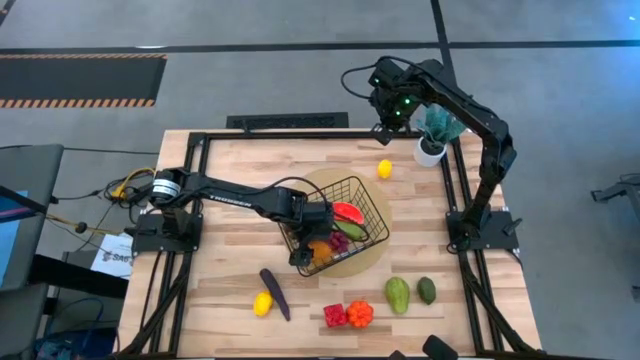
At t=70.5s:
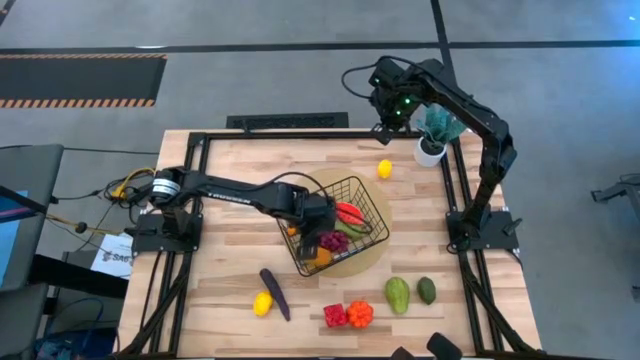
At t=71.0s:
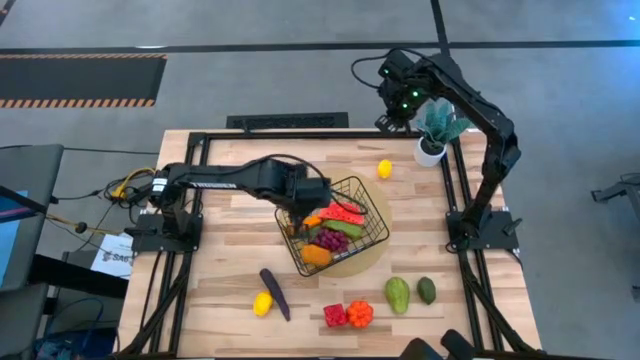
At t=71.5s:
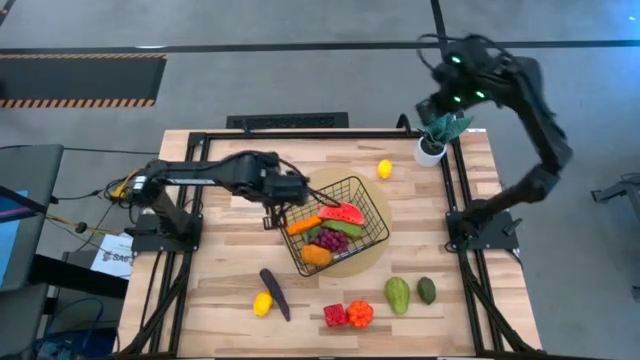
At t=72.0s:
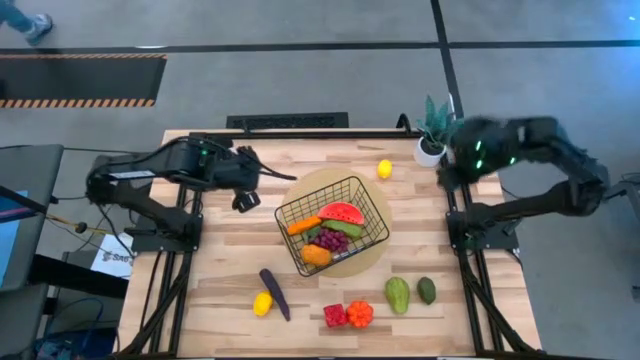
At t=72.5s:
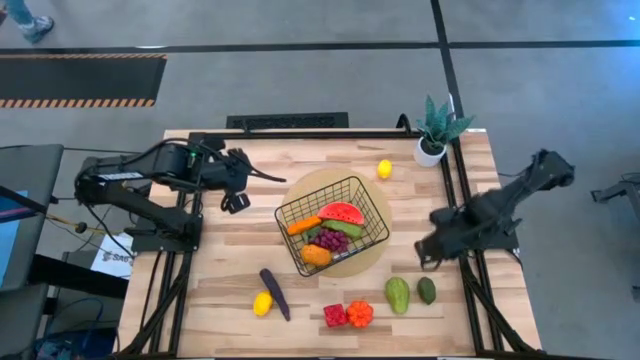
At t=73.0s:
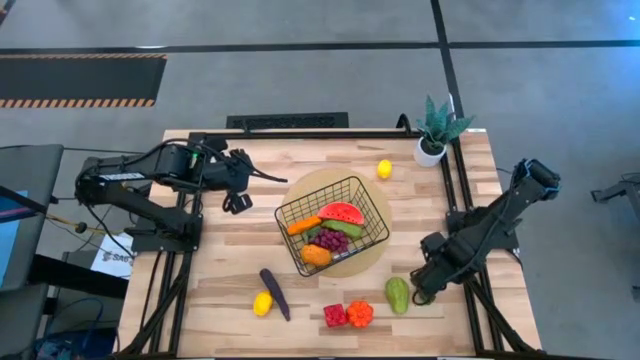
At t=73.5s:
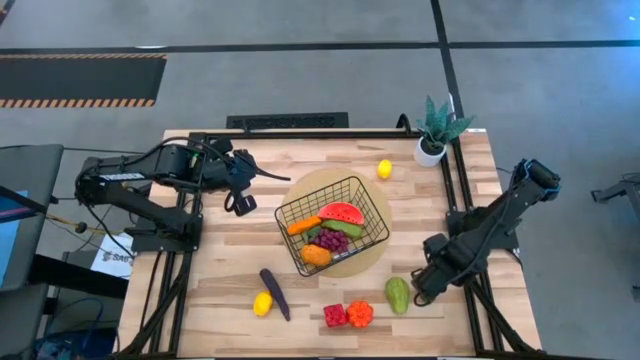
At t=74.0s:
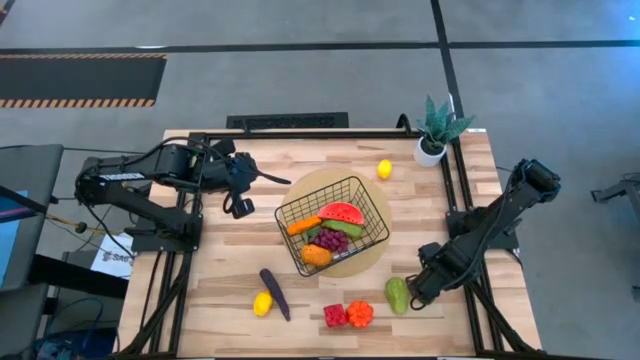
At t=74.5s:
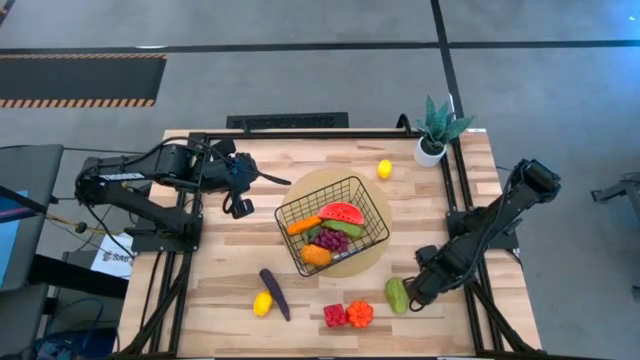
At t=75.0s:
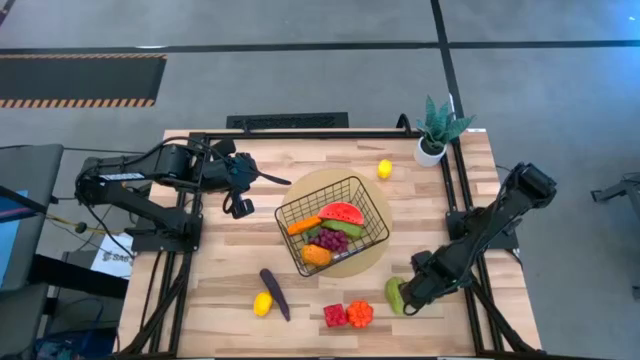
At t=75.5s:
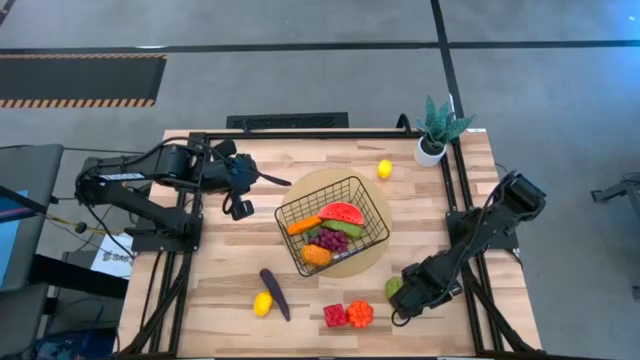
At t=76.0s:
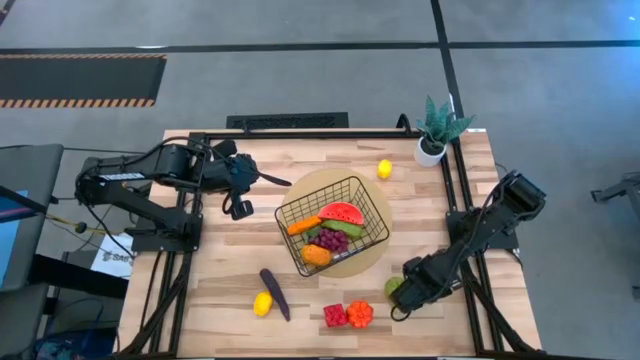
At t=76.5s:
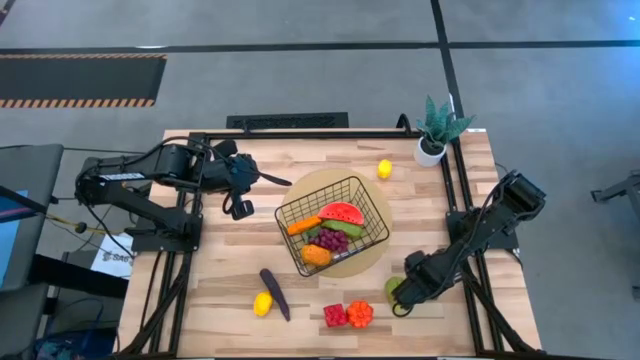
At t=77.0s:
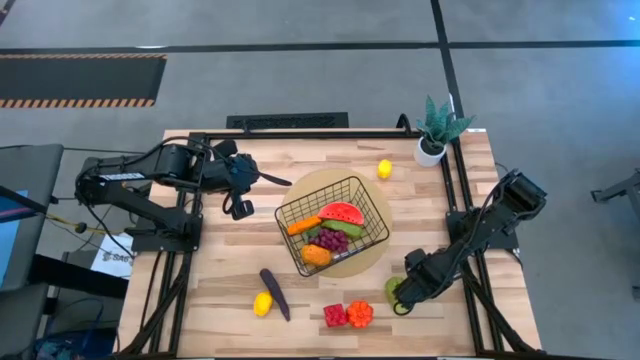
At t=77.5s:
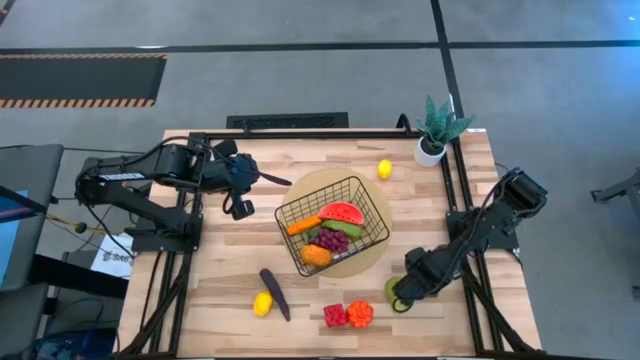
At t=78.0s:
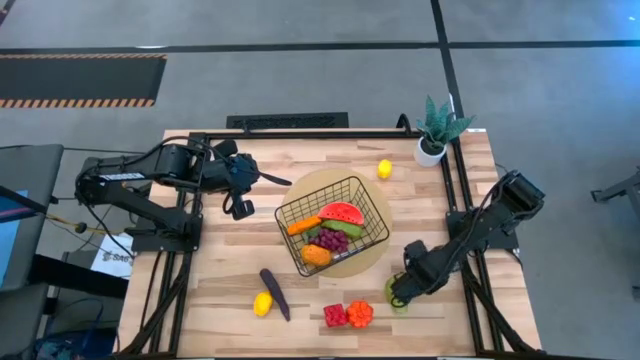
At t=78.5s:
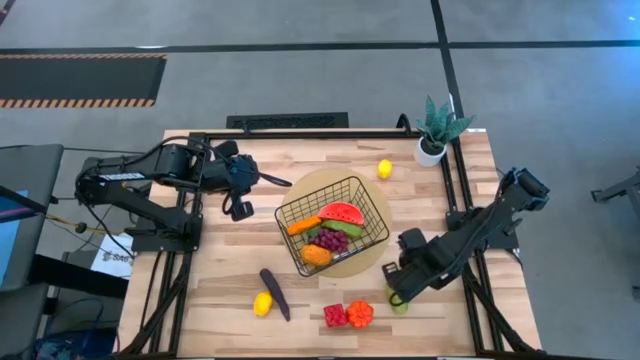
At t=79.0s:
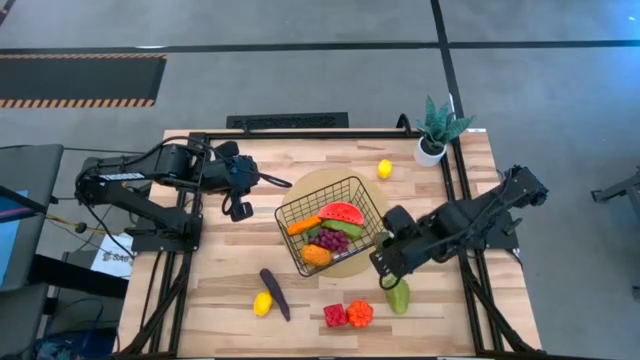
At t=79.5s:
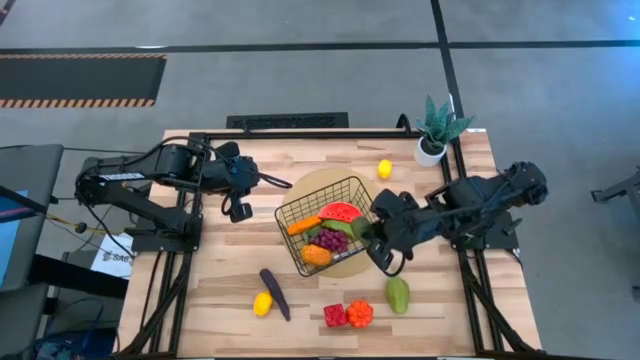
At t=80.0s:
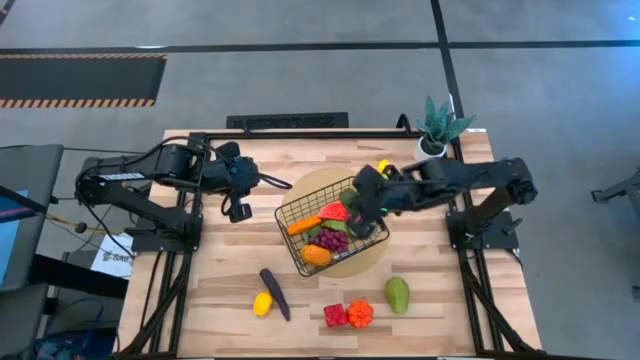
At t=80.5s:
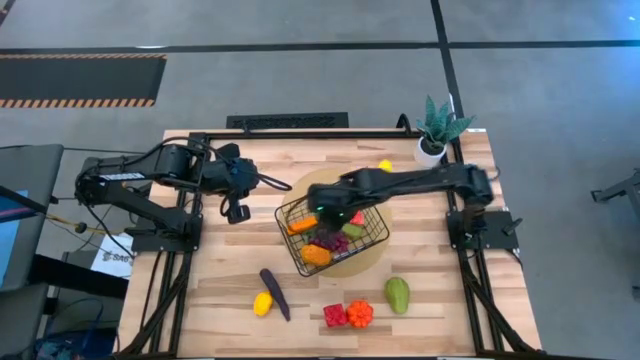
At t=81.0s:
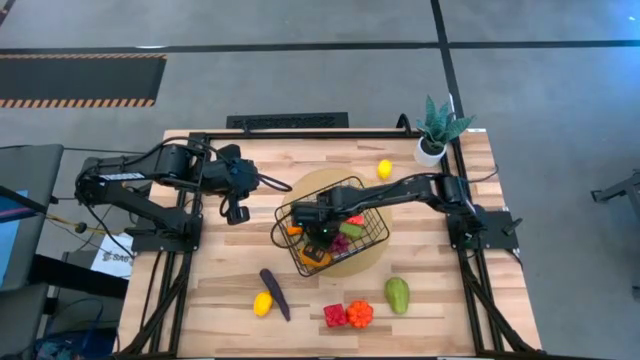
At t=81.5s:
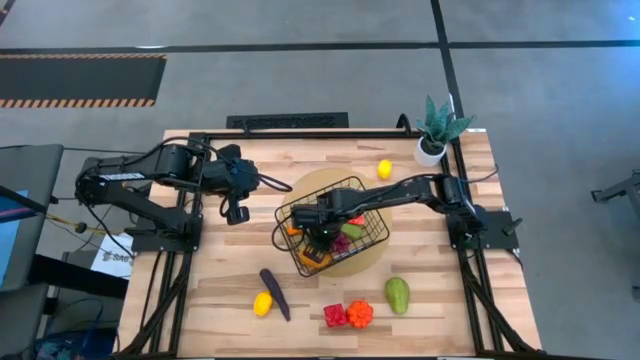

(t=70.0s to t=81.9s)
Task: Build produce basket
Put the green lime into the wire basket

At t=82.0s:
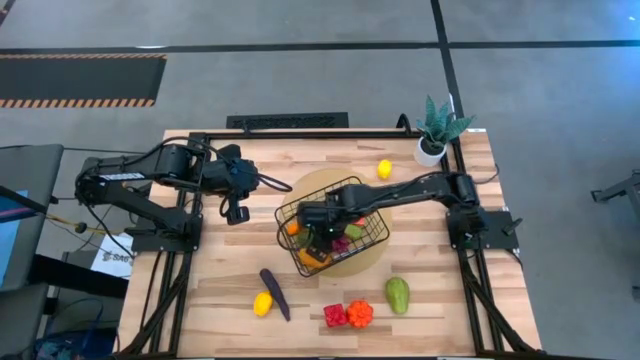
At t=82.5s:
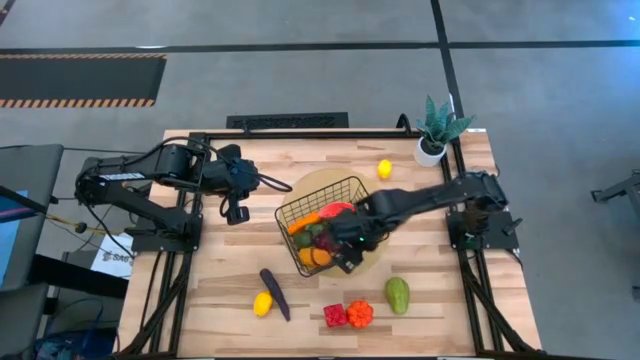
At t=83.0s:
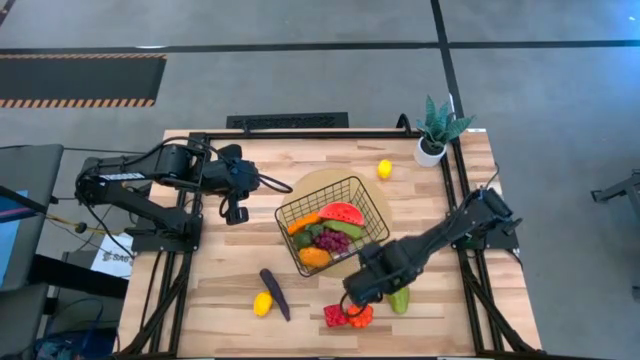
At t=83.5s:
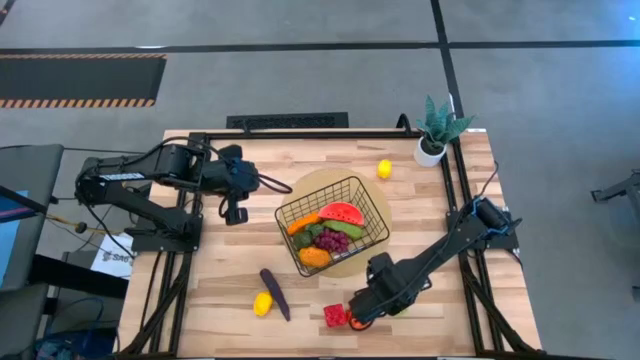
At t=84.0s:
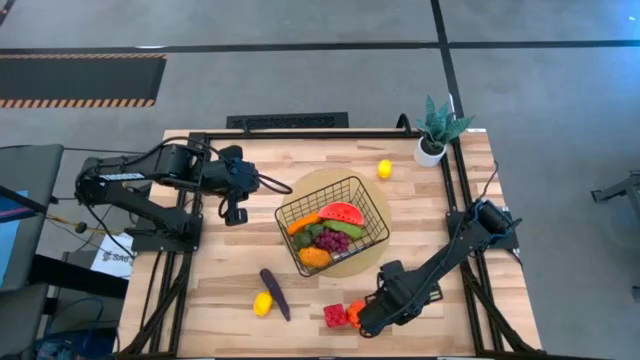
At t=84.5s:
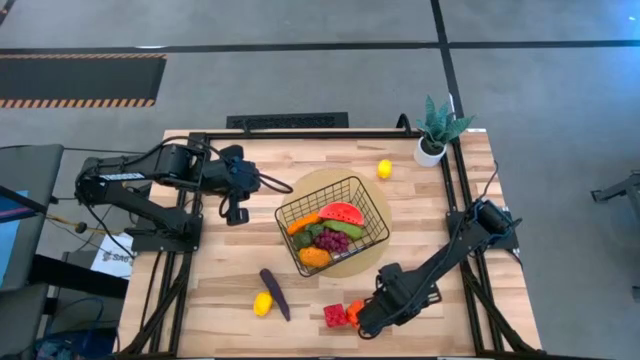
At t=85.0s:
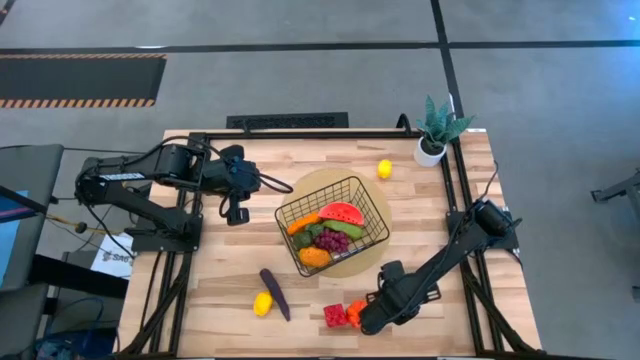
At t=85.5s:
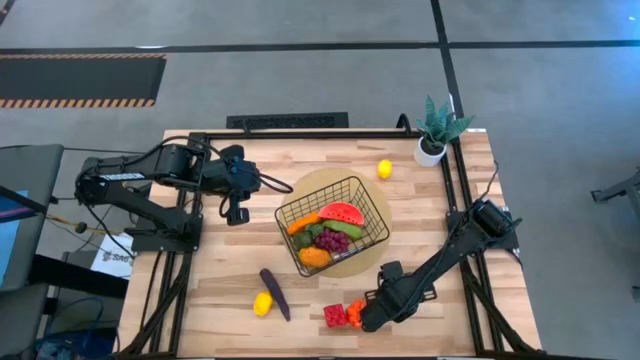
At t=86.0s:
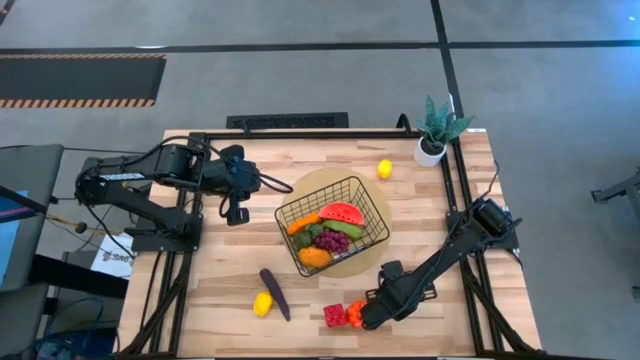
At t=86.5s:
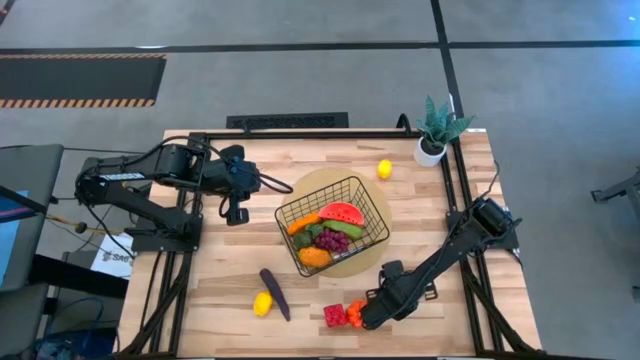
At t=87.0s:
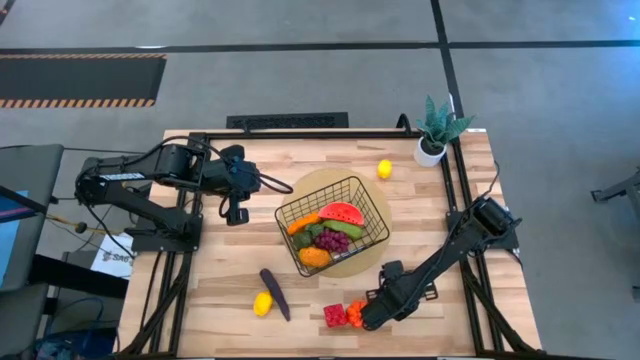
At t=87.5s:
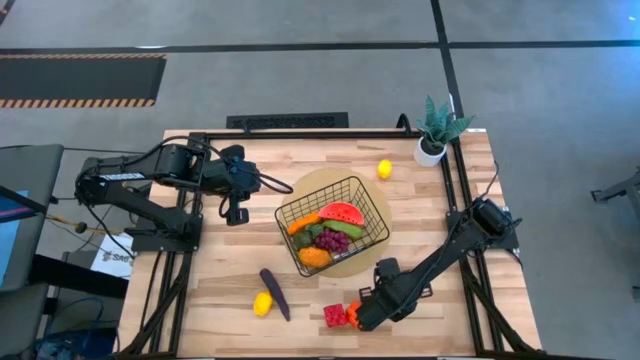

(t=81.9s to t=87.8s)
Put the green chayote into the wire basket

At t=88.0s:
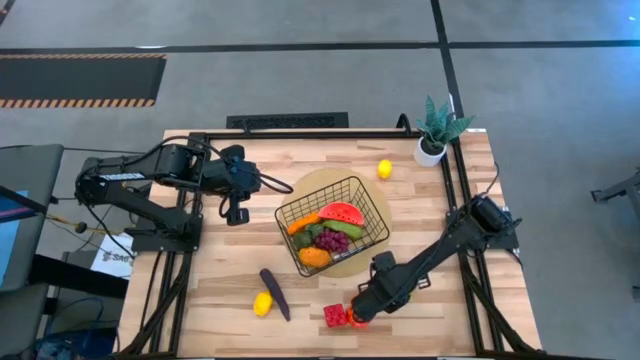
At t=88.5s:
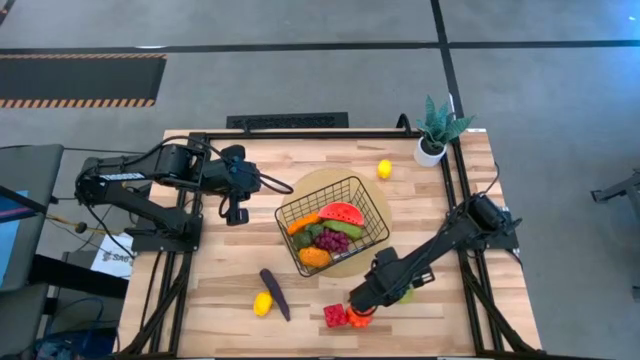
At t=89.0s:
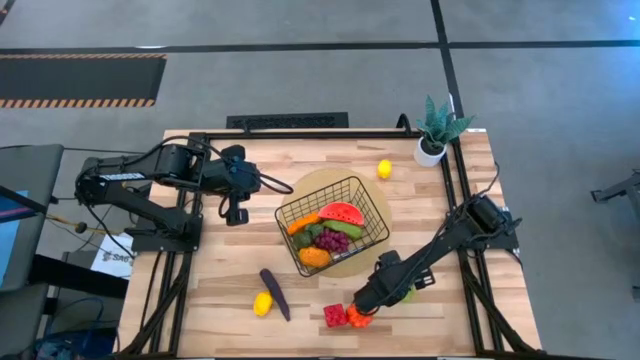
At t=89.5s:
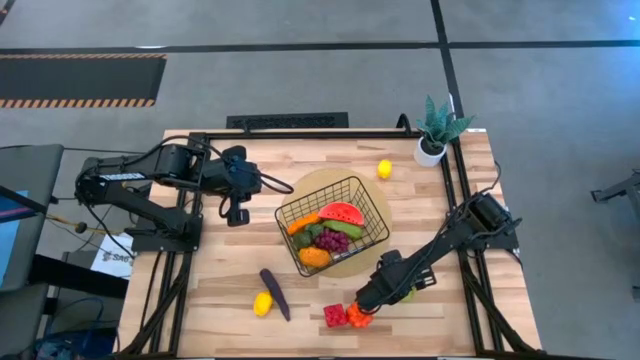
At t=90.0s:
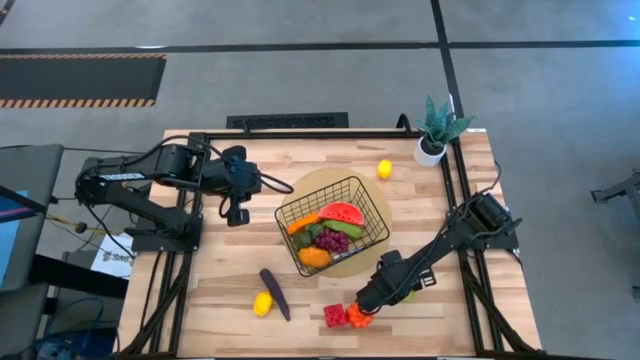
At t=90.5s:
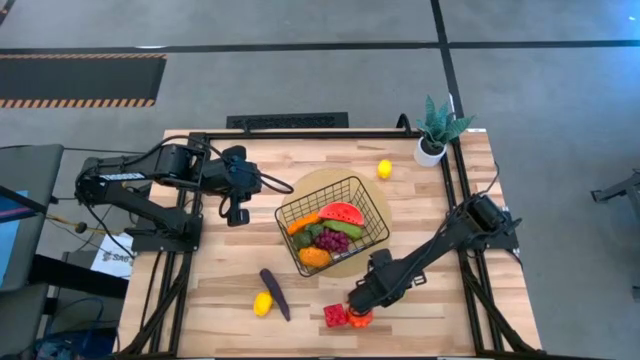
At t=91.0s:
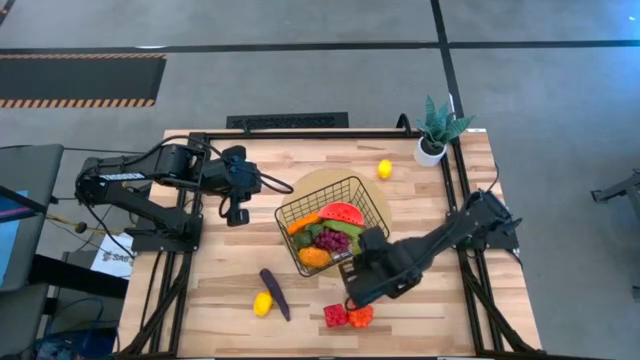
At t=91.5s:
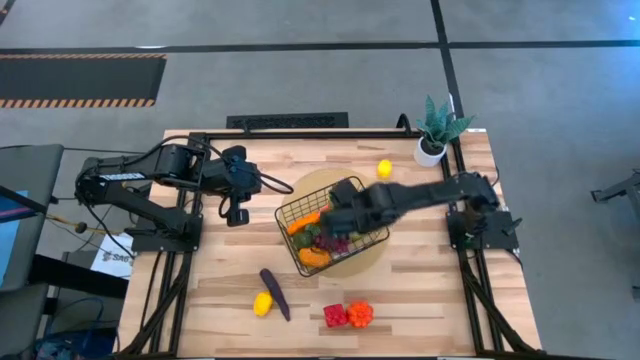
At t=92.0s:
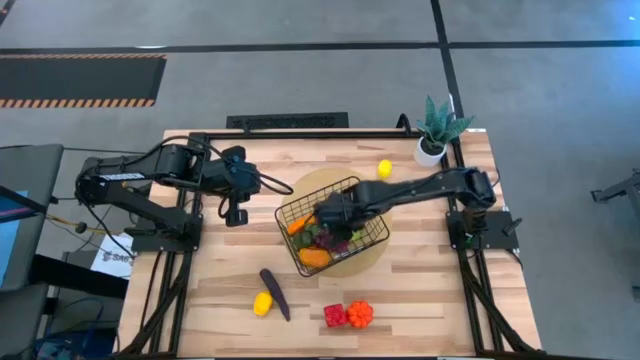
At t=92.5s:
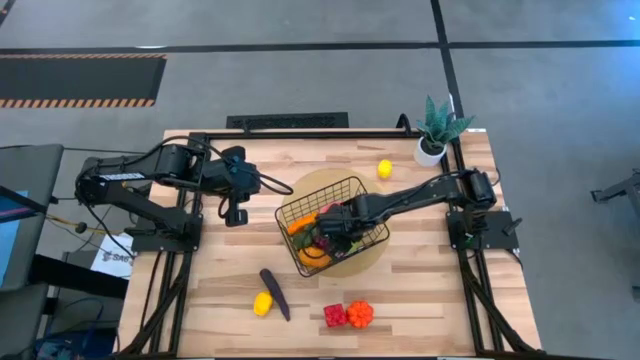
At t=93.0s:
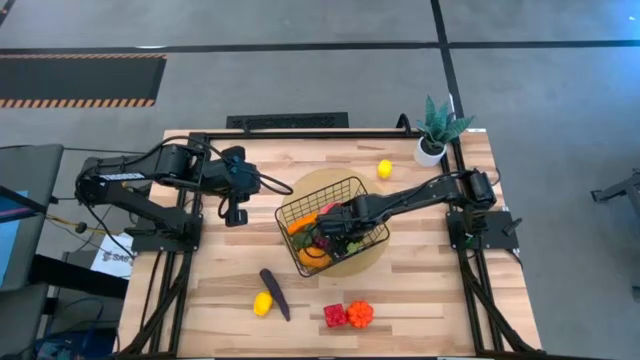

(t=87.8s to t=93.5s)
Put the green chayote into the wire basket
